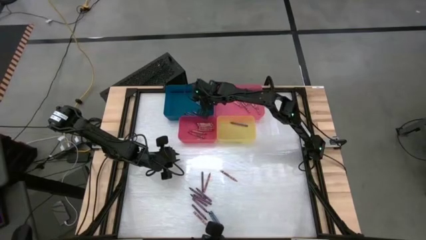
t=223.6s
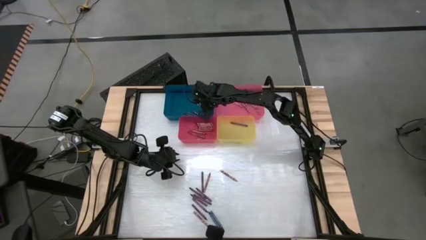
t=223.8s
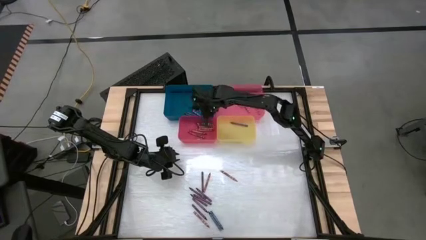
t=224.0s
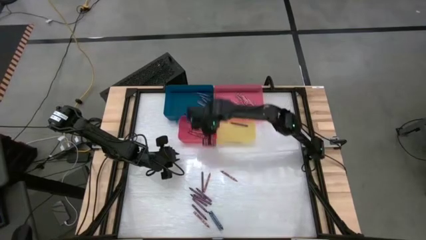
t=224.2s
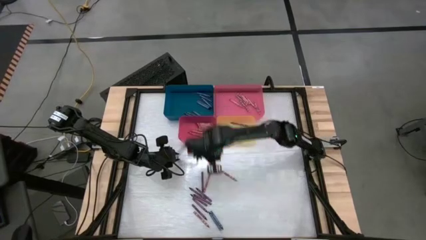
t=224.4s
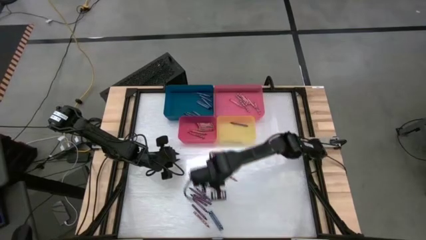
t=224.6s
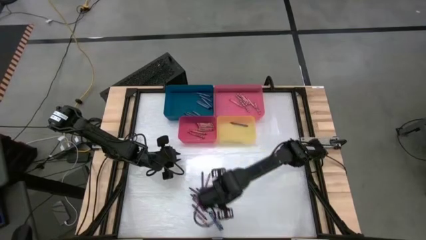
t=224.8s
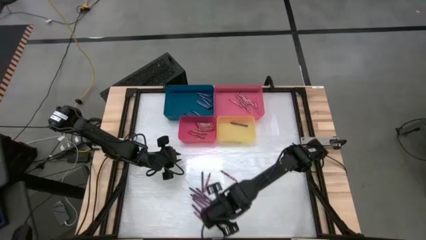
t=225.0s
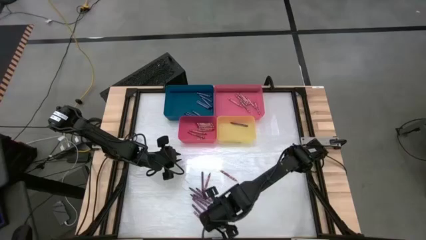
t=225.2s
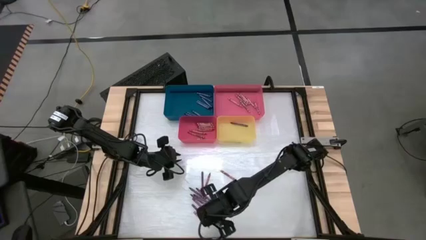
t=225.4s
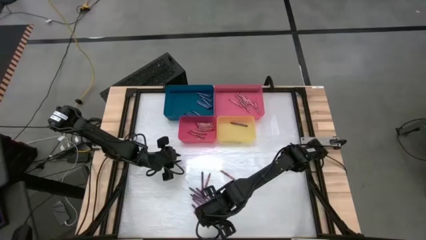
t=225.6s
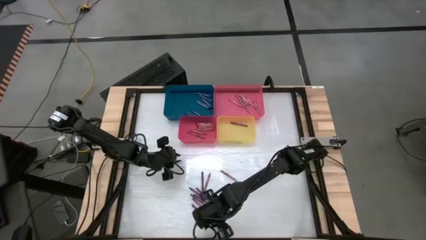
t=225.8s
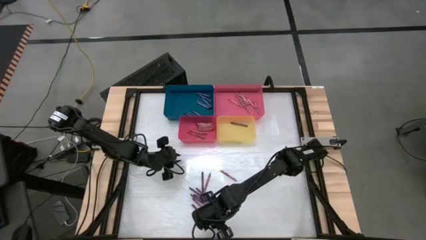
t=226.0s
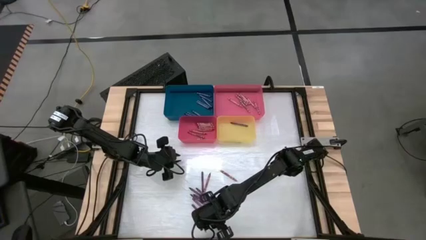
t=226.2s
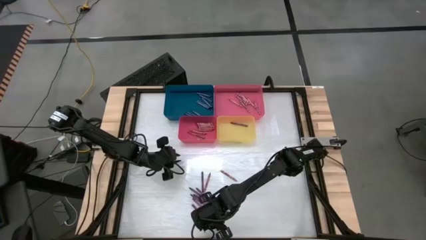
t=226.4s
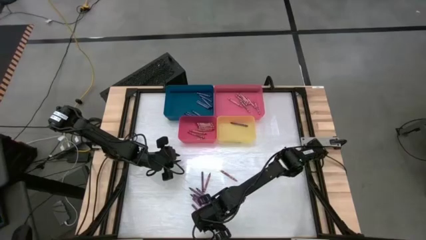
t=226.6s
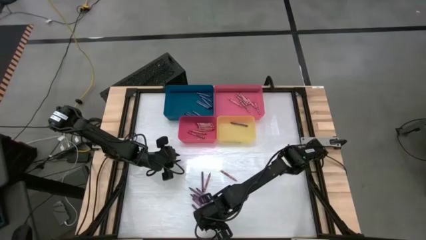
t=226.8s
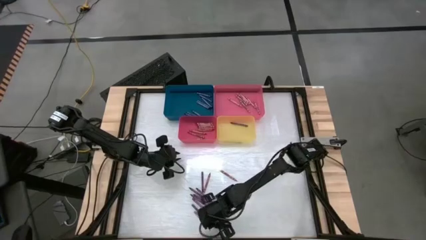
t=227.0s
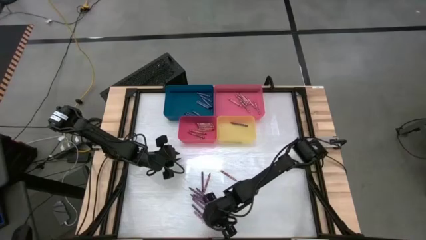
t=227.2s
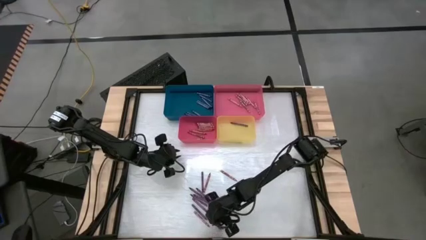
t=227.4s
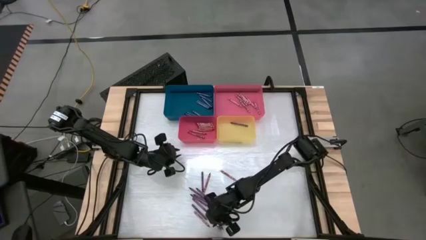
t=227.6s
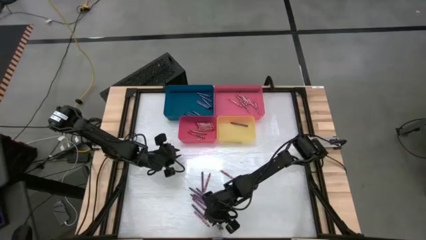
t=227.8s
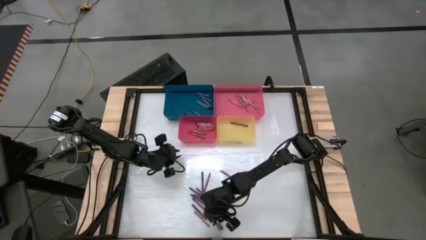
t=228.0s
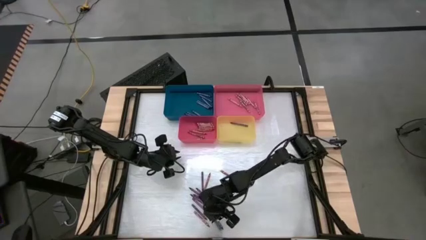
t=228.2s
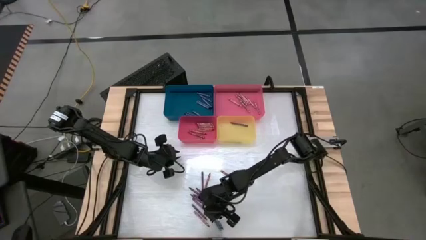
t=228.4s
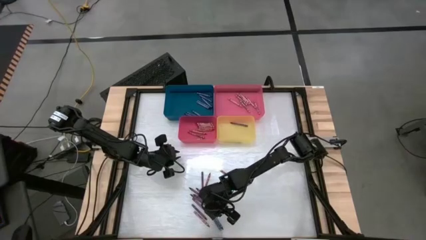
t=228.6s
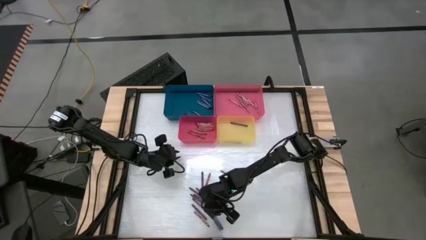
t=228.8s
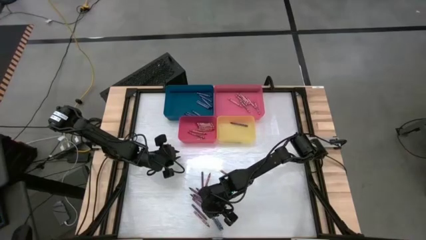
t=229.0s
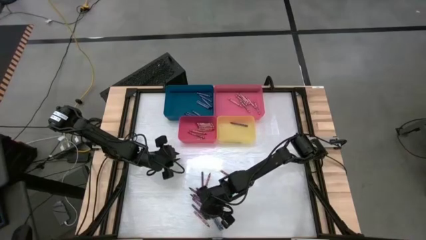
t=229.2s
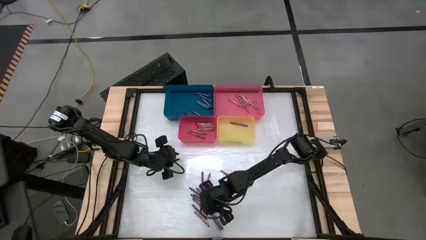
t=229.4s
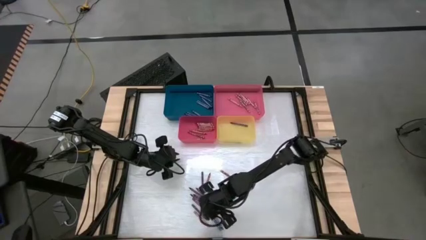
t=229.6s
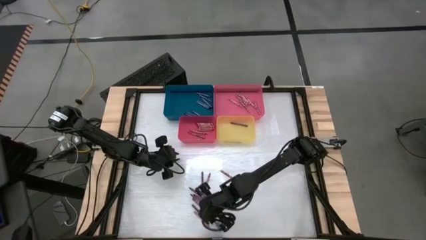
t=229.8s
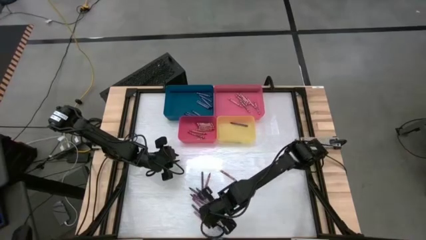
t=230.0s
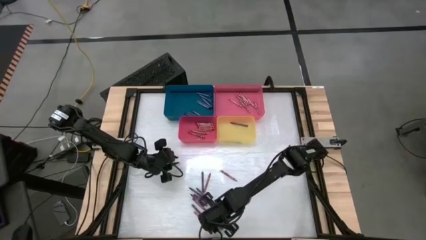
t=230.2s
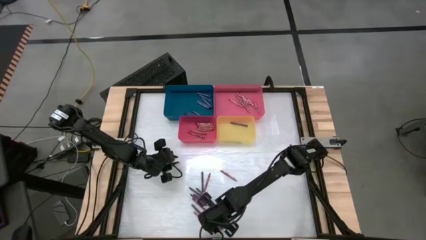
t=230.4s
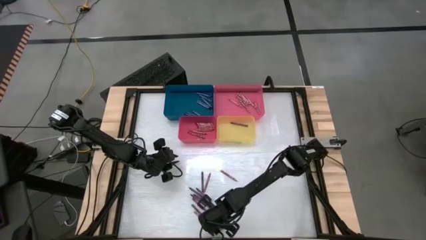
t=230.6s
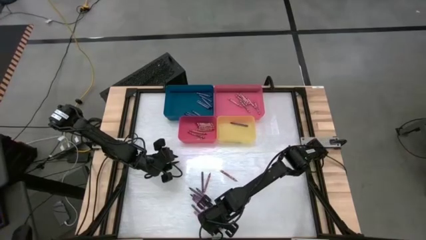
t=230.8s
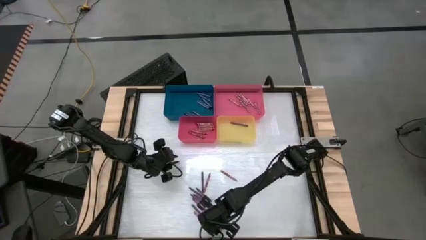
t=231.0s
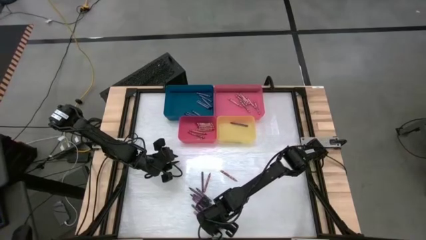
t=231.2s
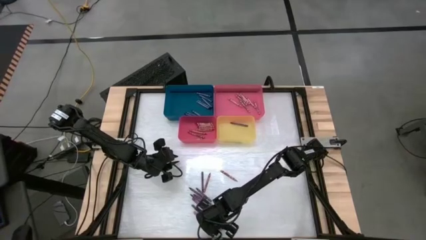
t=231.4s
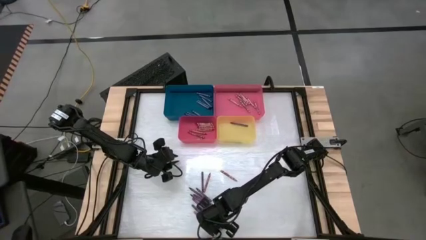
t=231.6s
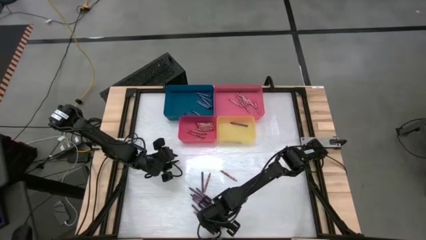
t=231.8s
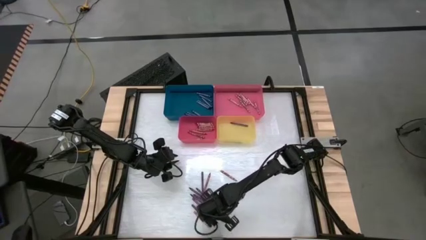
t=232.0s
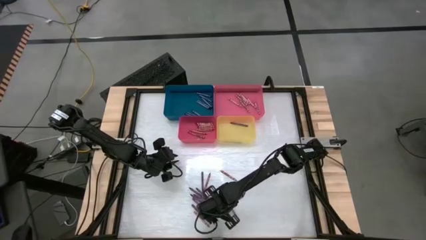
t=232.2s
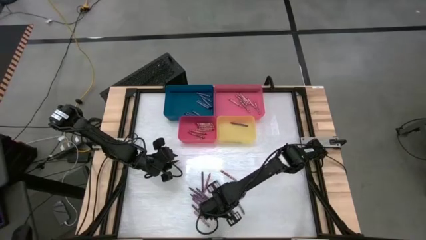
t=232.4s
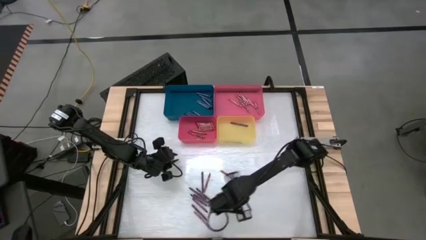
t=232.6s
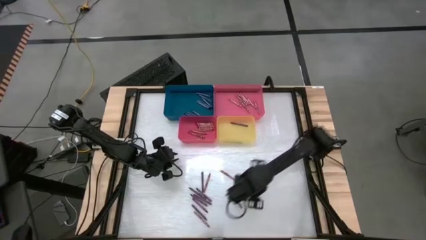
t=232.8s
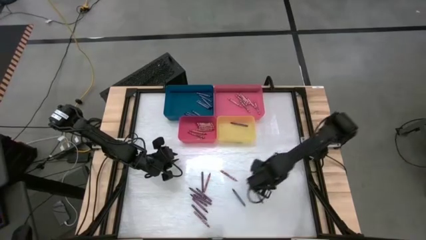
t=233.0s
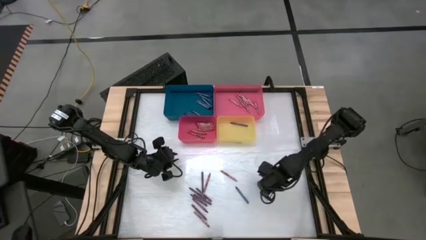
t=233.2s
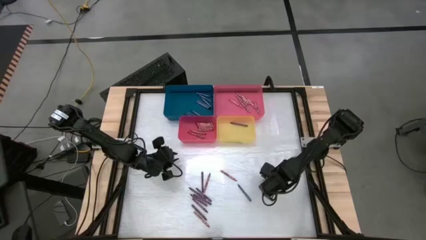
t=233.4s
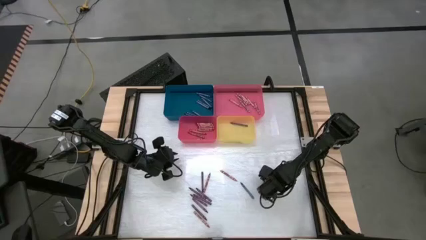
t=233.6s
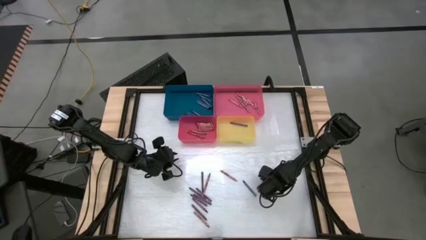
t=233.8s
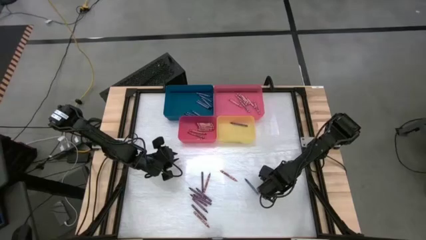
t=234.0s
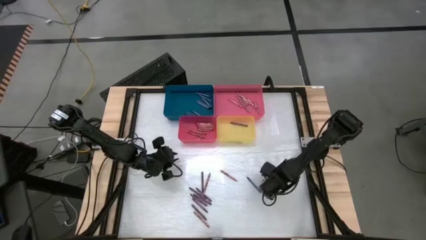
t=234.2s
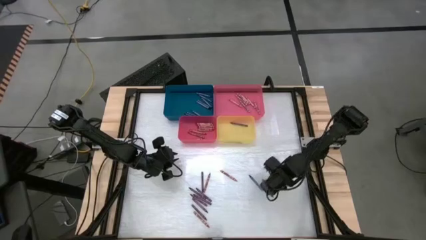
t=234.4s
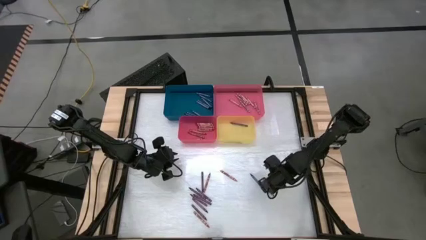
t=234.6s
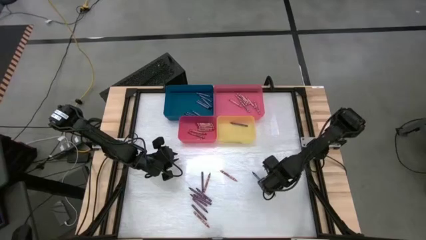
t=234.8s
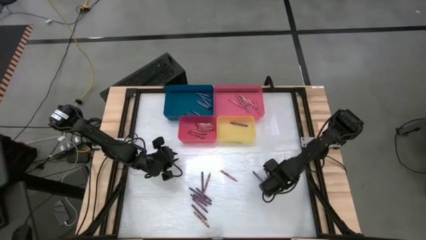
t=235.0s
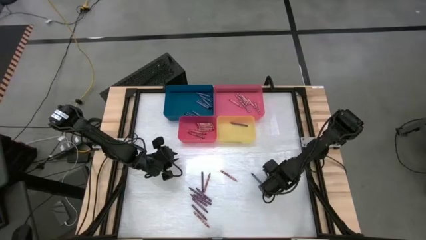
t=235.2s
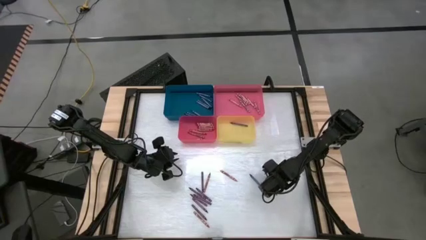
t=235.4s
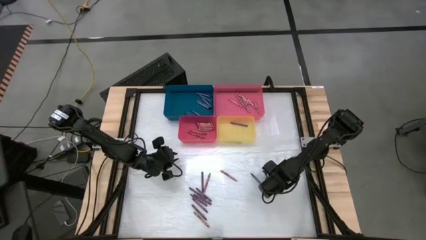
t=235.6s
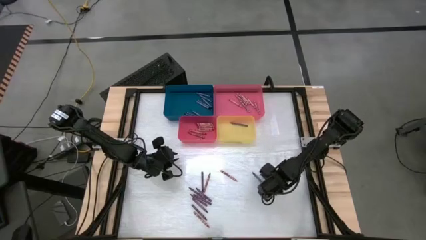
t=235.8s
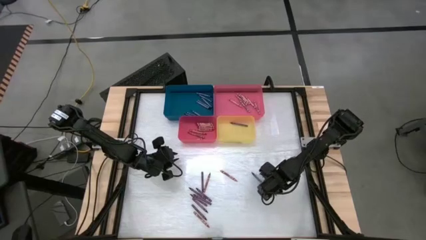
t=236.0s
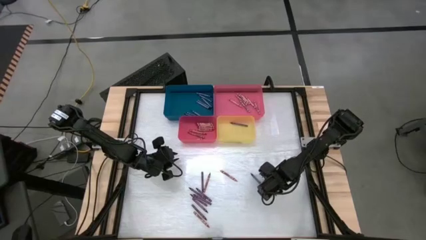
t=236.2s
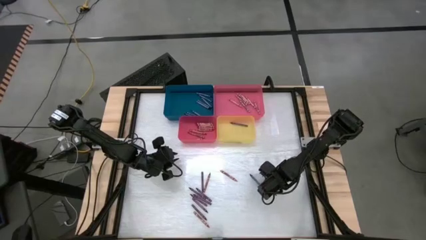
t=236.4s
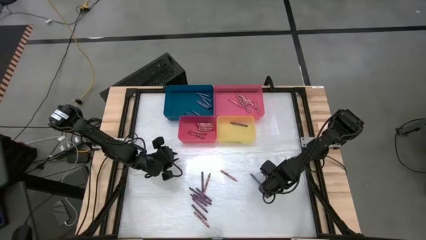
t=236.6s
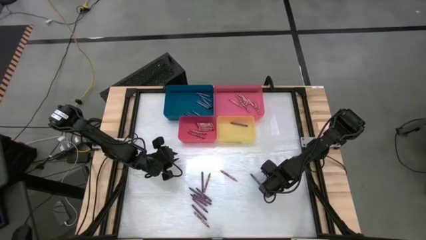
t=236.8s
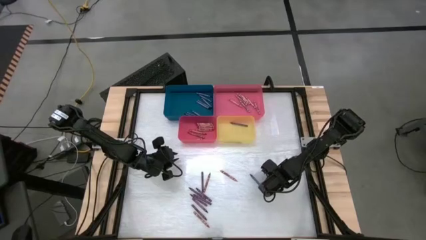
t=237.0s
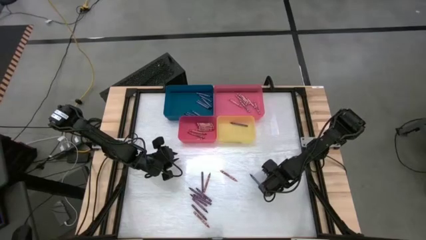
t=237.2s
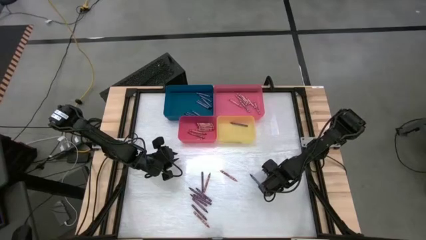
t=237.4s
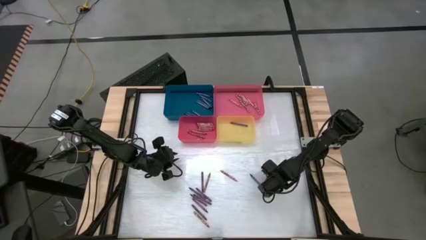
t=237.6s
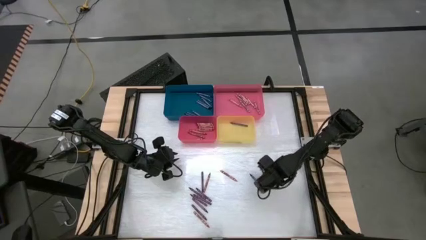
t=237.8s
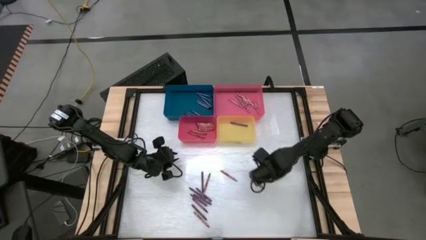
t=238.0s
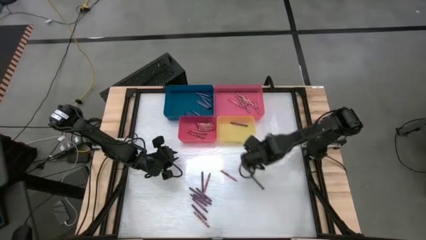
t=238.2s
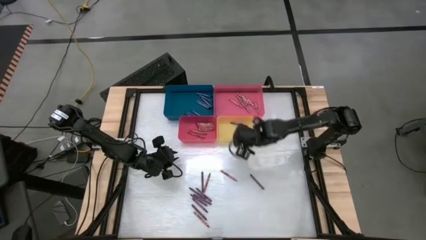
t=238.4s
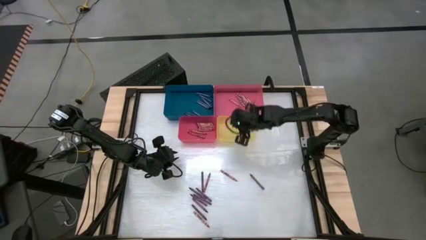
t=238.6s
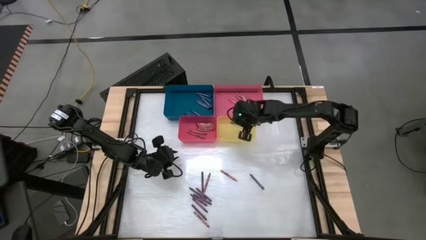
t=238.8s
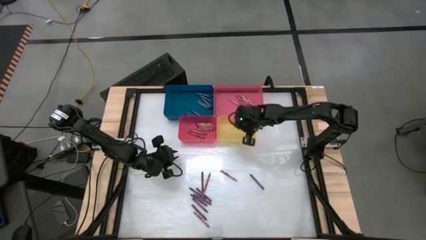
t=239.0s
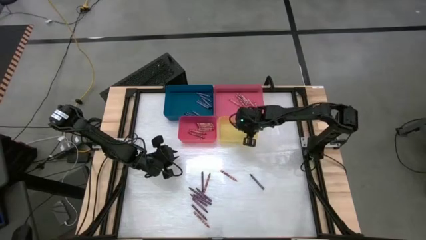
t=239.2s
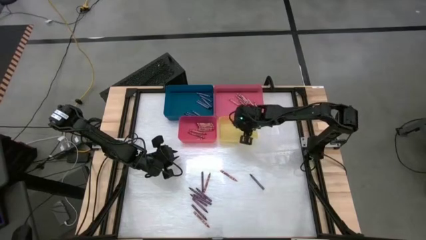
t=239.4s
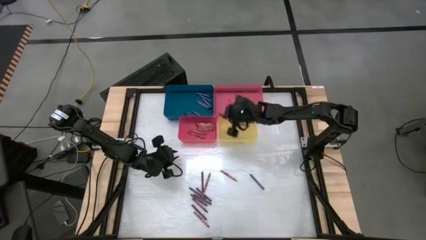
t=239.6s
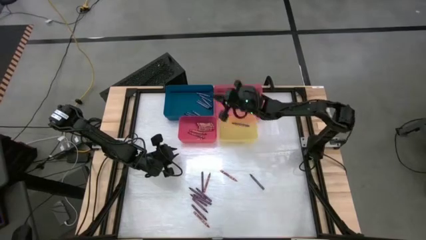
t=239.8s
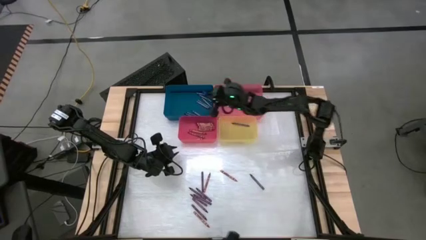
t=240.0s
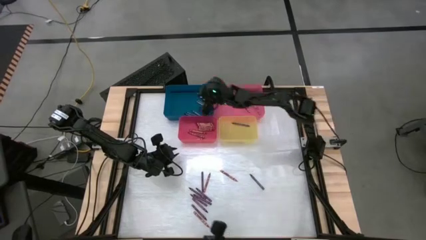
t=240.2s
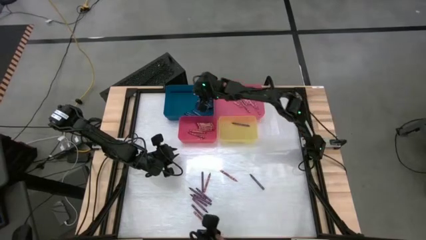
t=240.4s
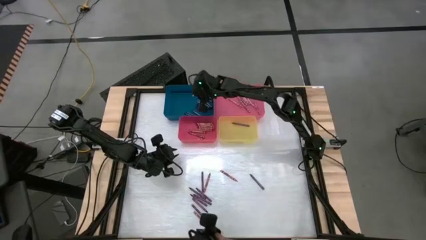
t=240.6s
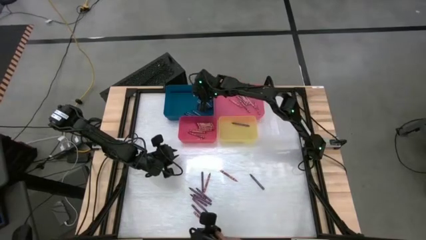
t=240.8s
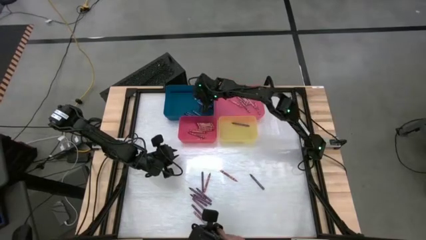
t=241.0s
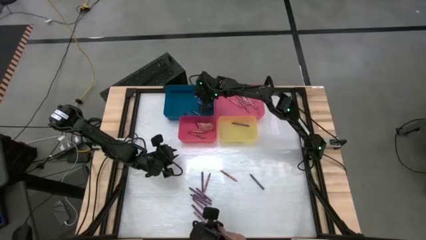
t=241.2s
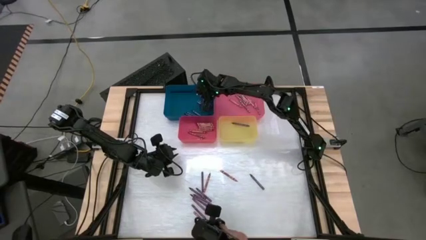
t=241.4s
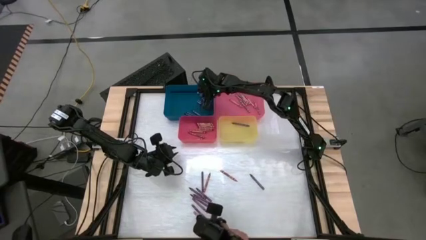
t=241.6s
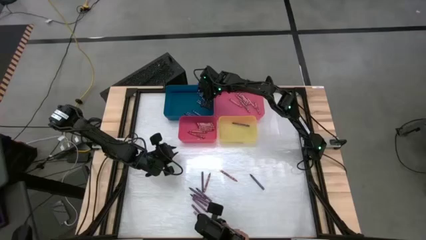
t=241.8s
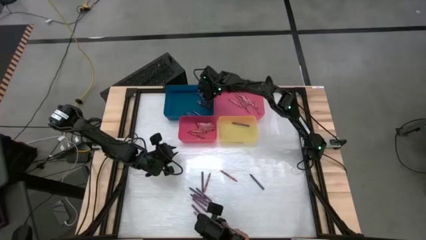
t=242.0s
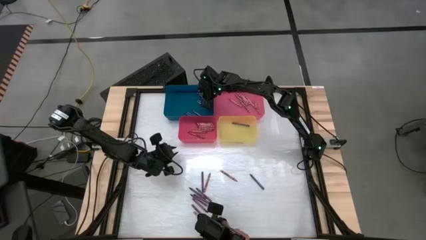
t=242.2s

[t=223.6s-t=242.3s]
Task: Sort crayons
Put the blue crayon into the blue bin
